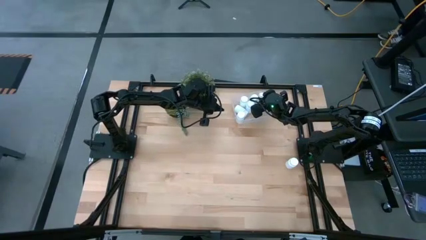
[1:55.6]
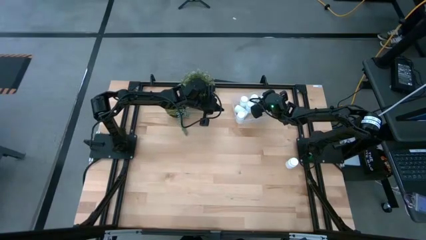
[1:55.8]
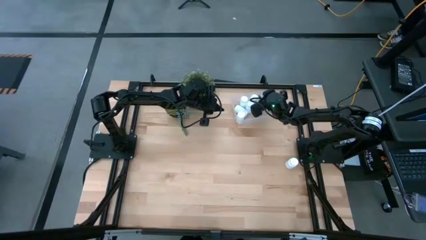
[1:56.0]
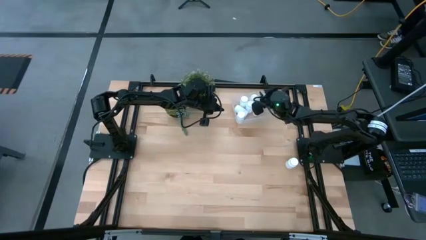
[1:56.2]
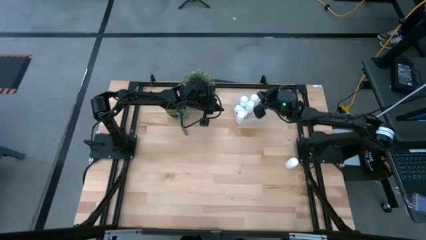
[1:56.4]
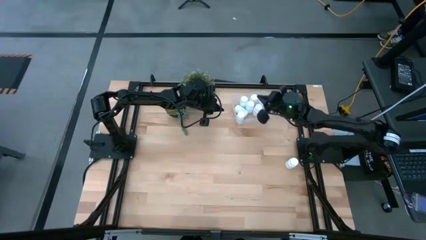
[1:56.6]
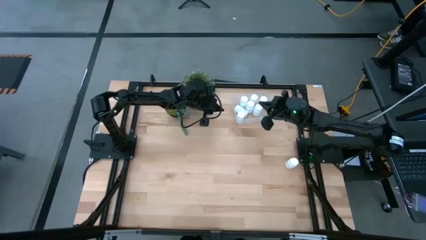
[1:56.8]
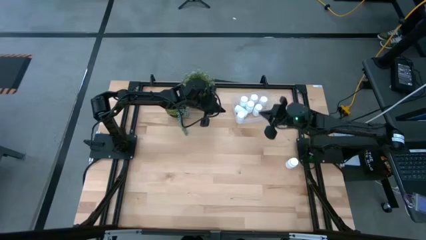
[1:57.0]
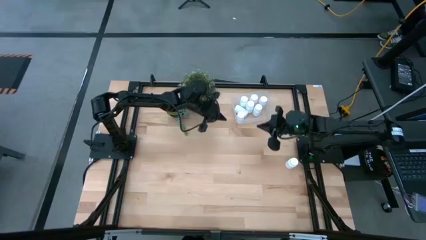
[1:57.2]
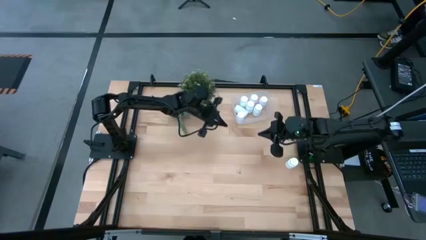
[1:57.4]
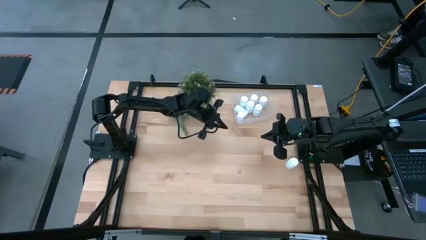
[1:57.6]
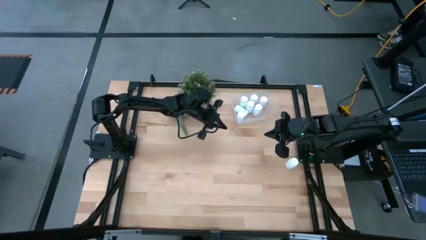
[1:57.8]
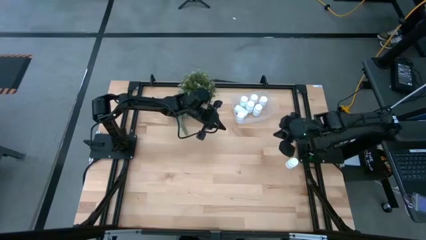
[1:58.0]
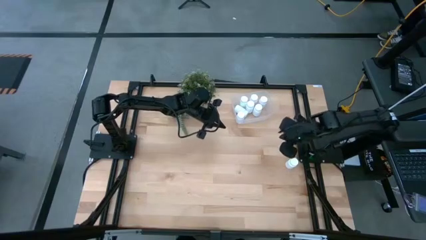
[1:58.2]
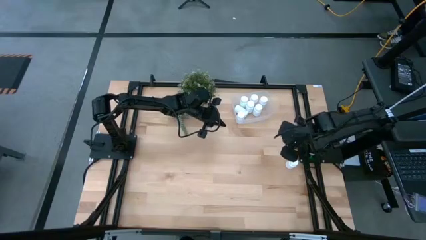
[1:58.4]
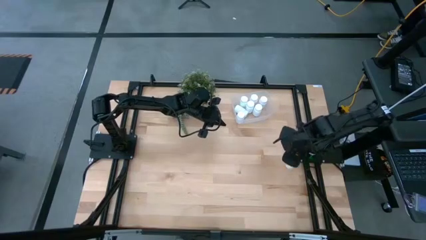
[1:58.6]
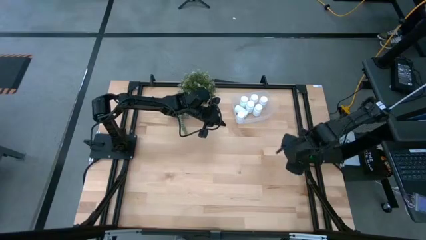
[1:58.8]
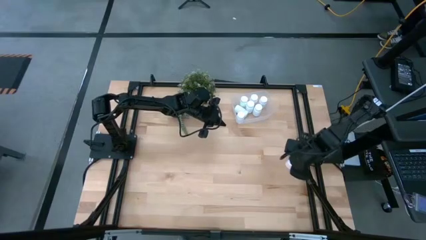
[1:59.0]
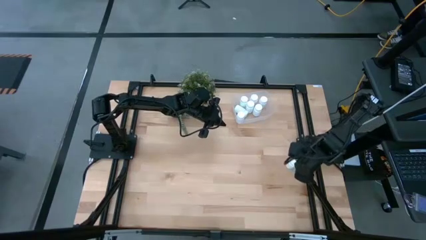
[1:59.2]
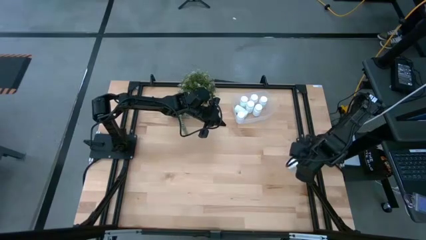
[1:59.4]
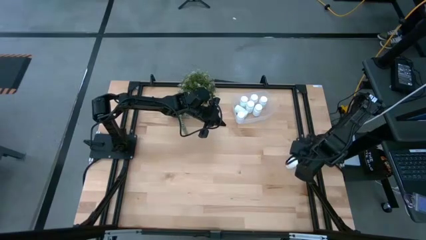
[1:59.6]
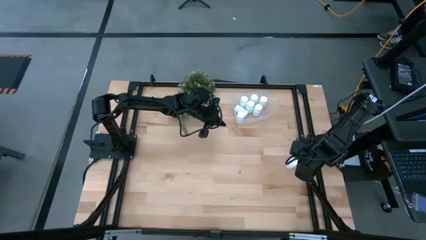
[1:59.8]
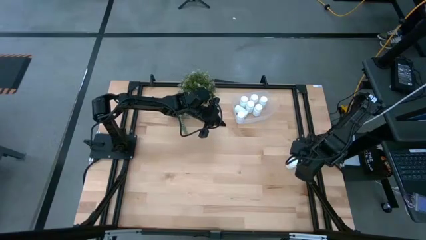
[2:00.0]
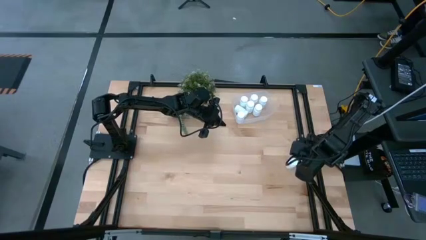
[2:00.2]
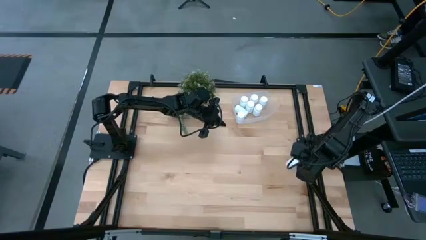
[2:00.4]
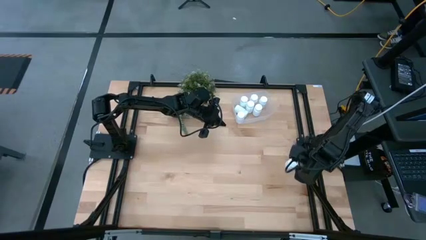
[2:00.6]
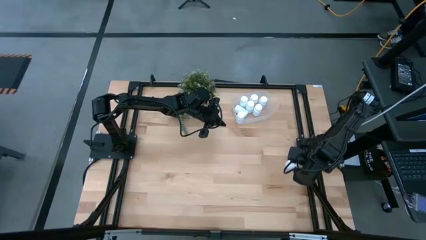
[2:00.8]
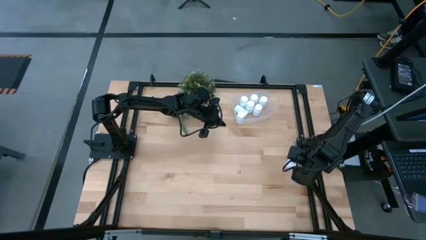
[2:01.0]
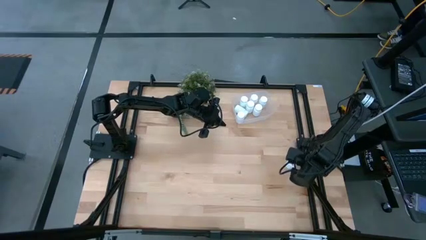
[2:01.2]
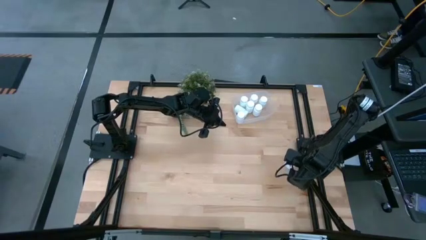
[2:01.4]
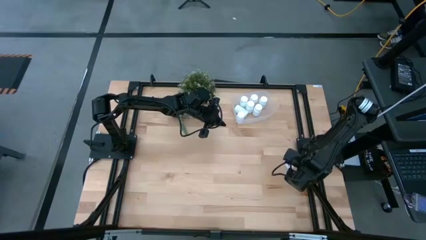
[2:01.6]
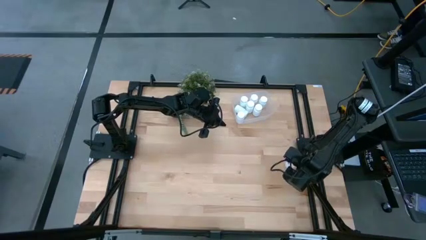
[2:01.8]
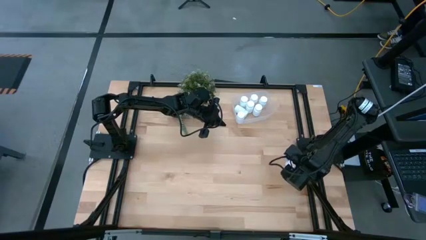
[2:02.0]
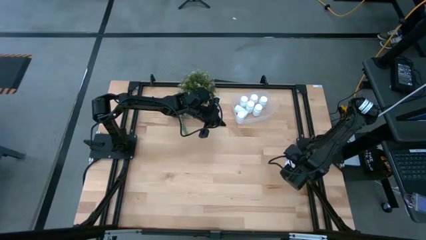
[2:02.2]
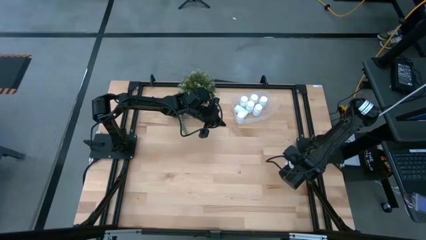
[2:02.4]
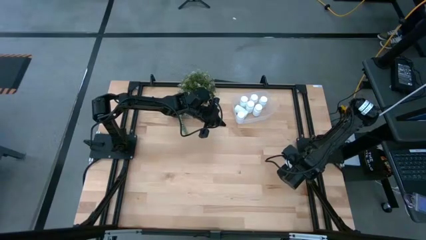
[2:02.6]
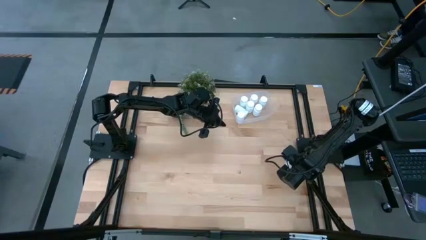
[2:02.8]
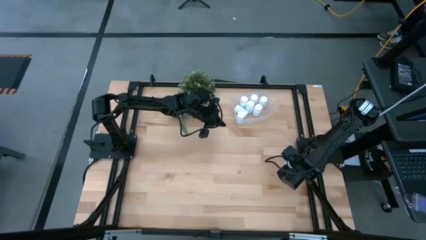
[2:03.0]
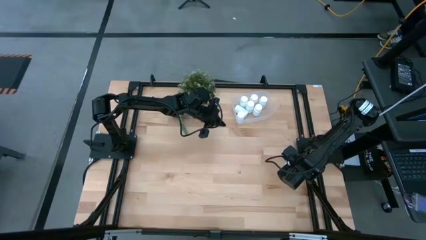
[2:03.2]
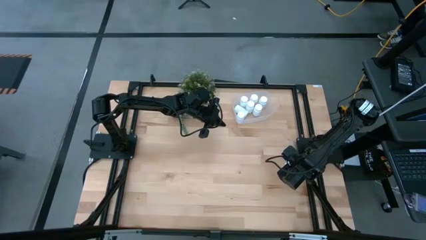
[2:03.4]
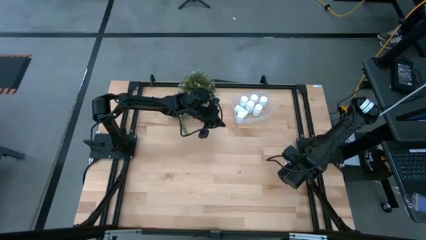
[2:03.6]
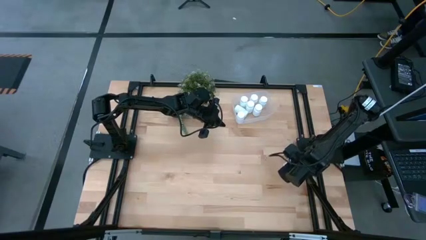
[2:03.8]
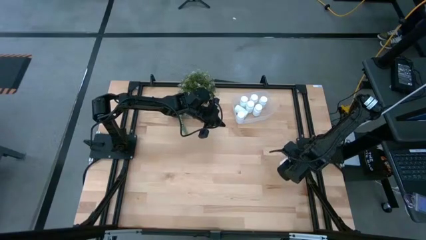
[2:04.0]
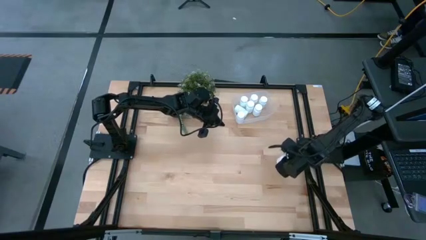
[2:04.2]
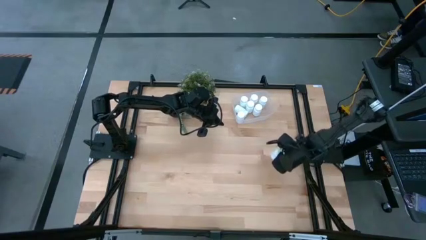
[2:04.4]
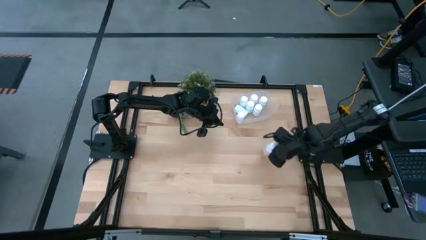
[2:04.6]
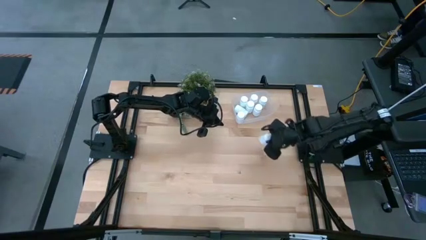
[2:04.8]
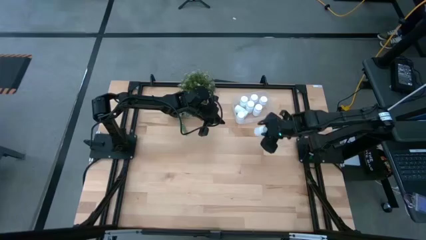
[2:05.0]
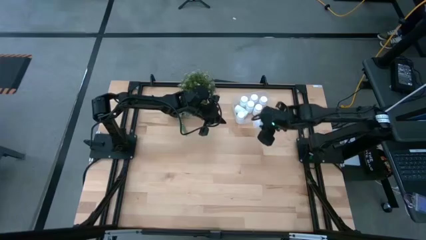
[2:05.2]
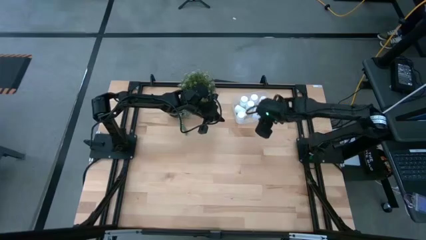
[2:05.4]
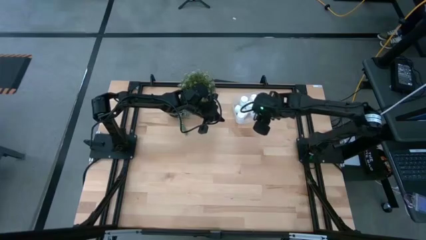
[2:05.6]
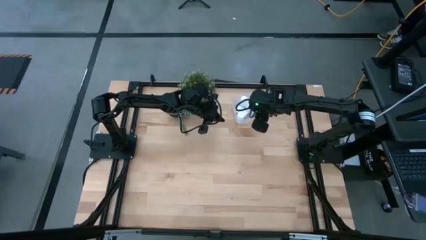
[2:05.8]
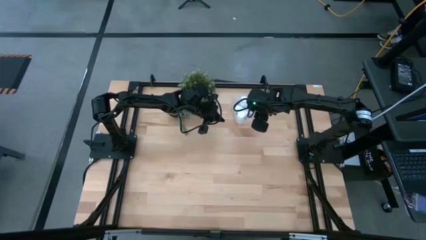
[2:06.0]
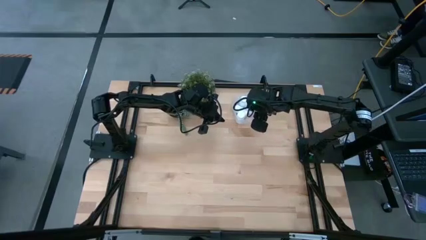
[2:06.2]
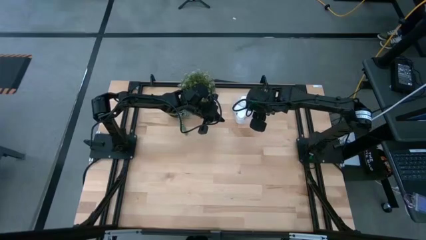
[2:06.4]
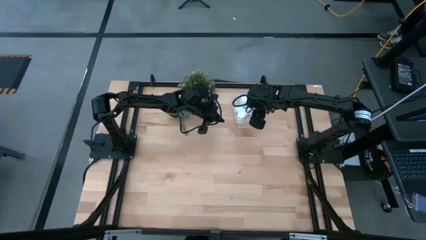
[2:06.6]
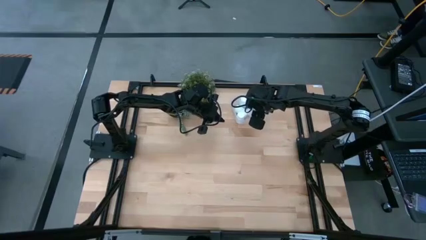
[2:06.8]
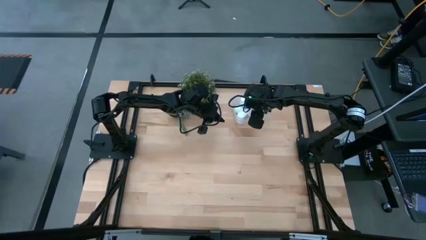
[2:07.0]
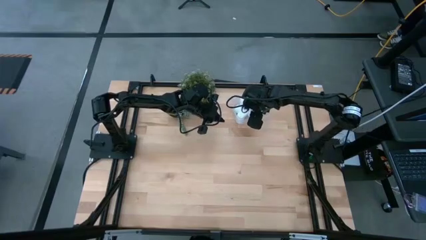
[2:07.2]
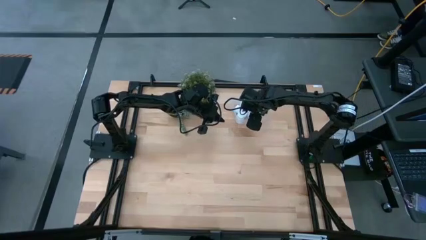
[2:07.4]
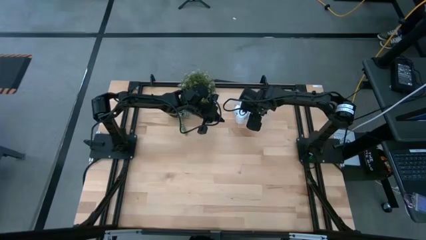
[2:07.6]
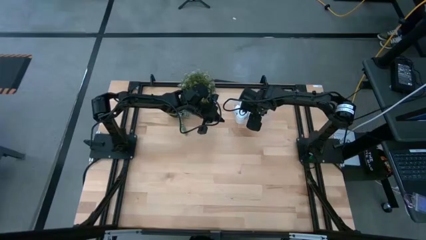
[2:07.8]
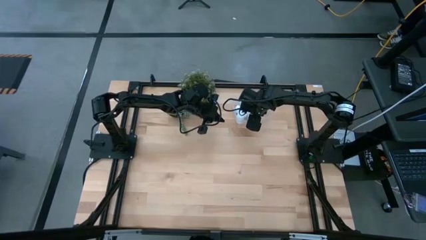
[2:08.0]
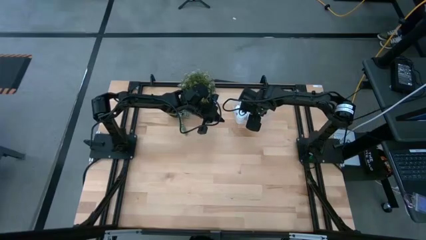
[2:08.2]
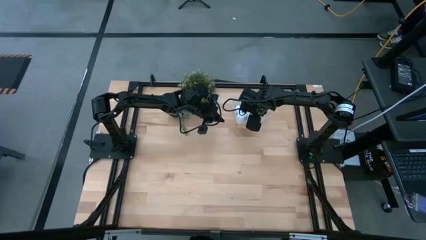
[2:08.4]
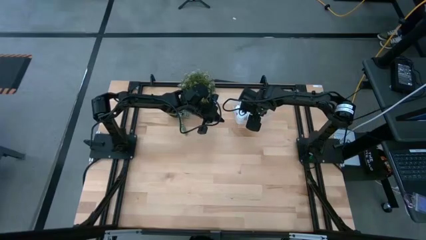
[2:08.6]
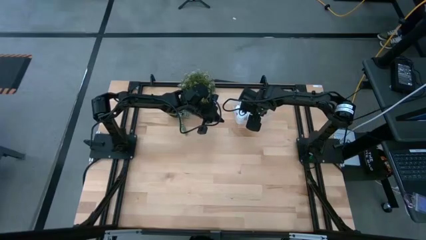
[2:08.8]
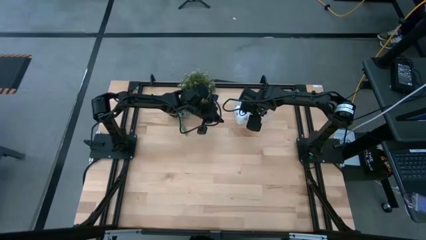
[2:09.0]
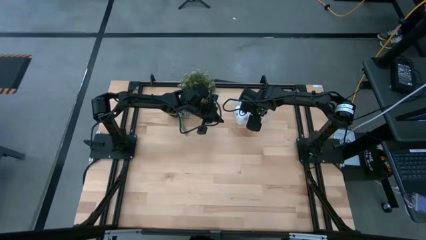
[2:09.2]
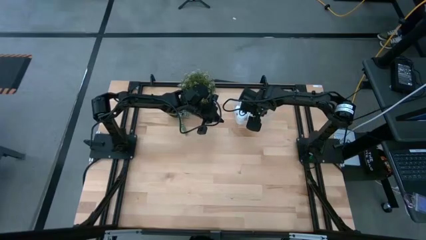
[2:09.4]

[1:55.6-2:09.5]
Task: Pick and place pill bottles into a basket
Put the white pill bottle into the transparent bin

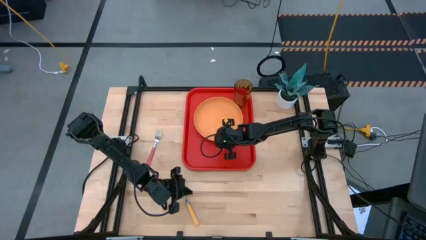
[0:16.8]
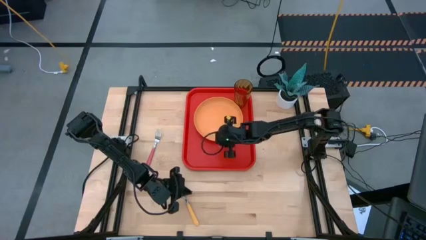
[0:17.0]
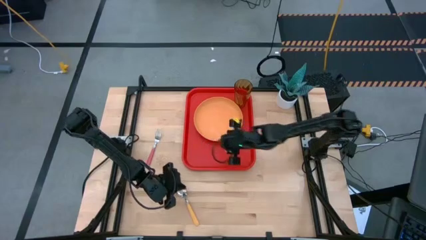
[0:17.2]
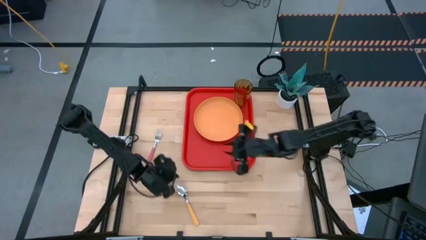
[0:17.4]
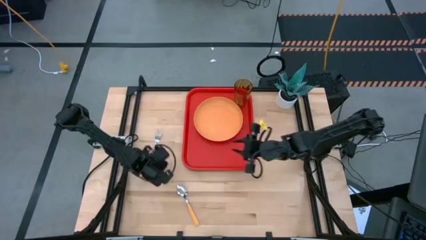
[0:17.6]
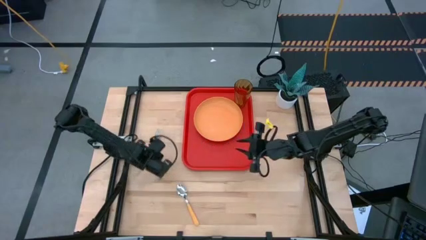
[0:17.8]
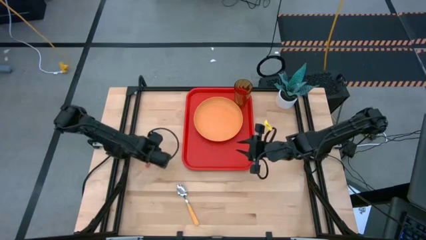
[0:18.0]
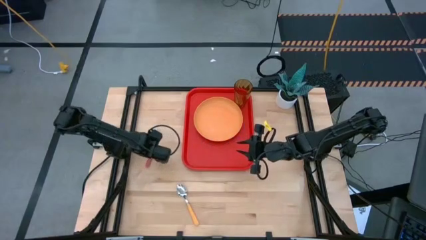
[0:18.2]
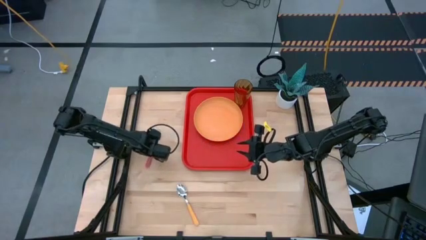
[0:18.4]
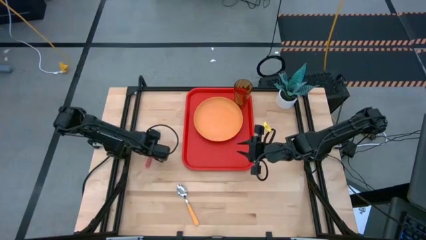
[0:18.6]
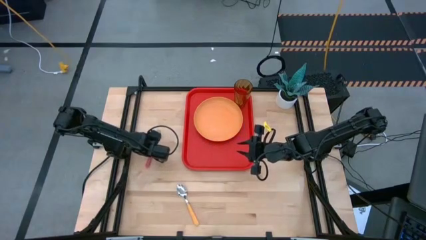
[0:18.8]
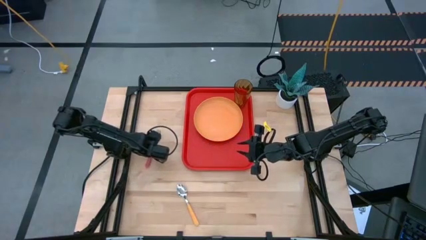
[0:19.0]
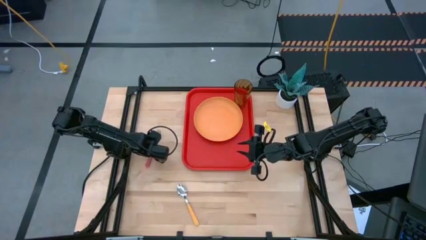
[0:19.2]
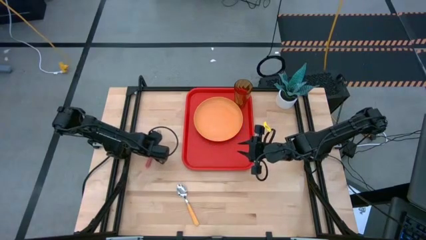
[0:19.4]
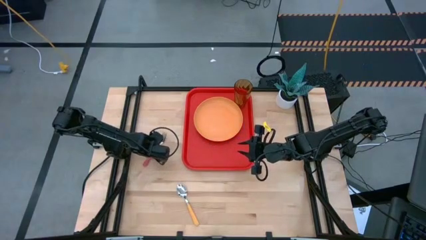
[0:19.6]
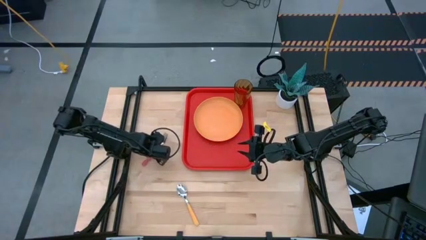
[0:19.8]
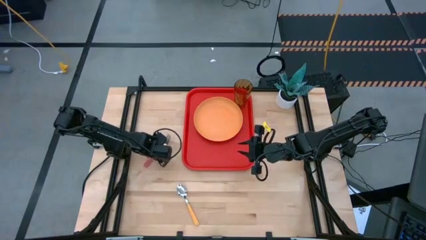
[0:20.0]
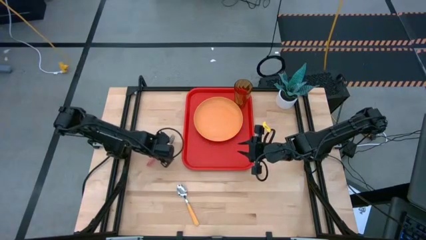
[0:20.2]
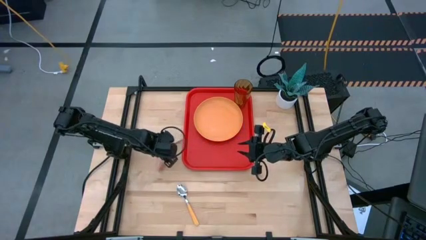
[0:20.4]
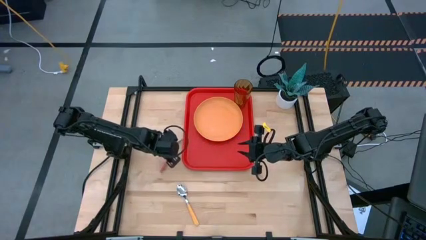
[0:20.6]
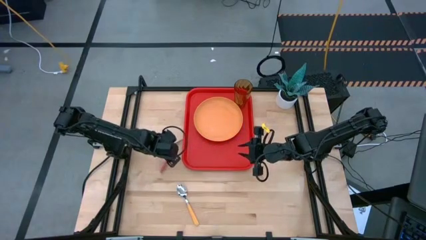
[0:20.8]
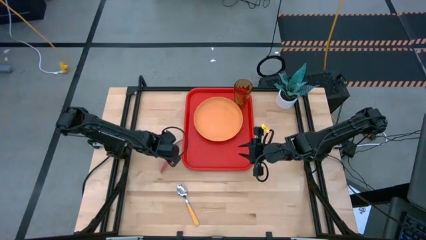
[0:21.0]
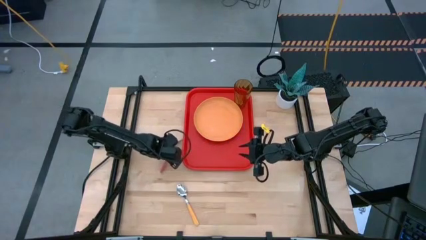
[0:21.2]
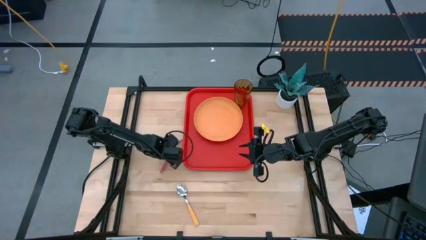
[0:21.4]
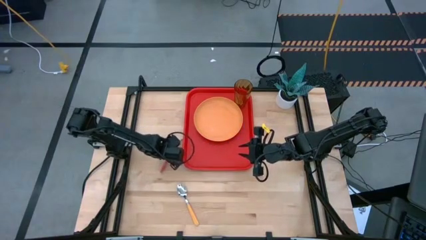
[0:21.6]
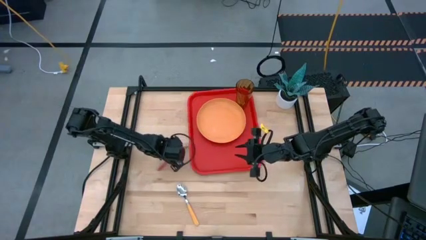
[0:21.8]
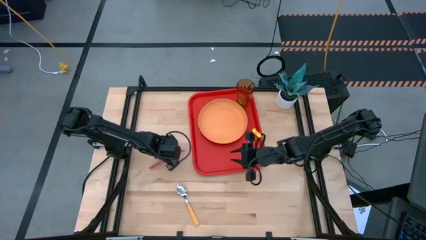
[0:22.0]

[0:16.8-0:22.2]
Task: Pick and place plate/cup/fork/spoon on tray
Put the pink fork on the red serving tray to the bottom of the yellow plate
